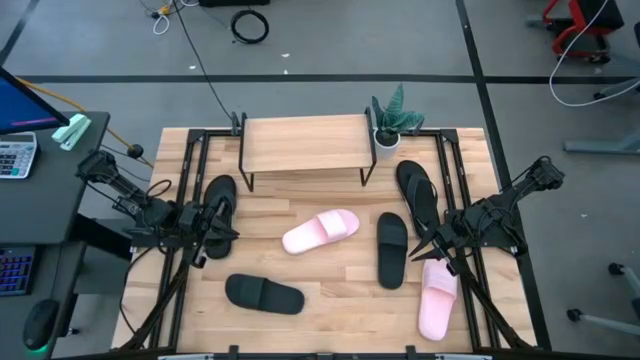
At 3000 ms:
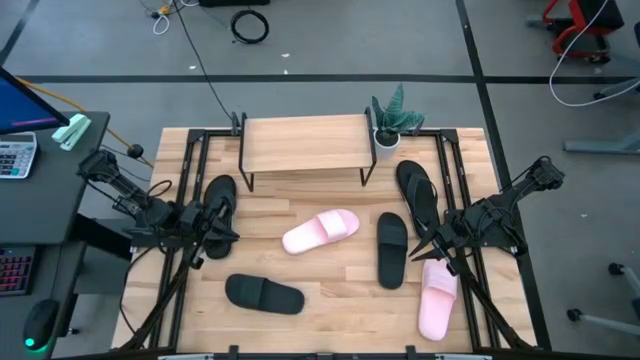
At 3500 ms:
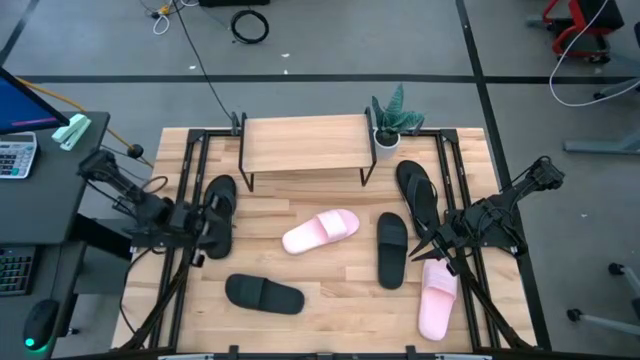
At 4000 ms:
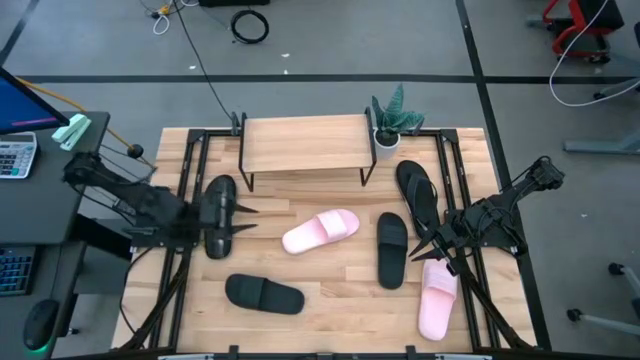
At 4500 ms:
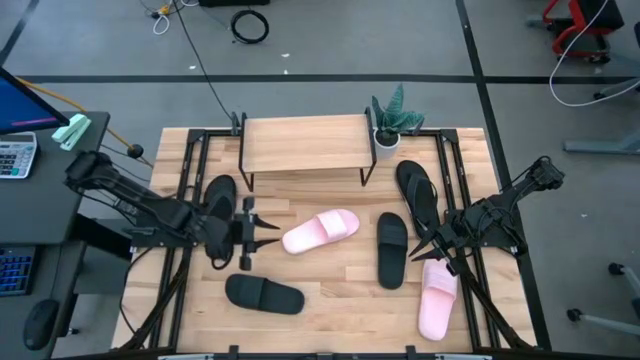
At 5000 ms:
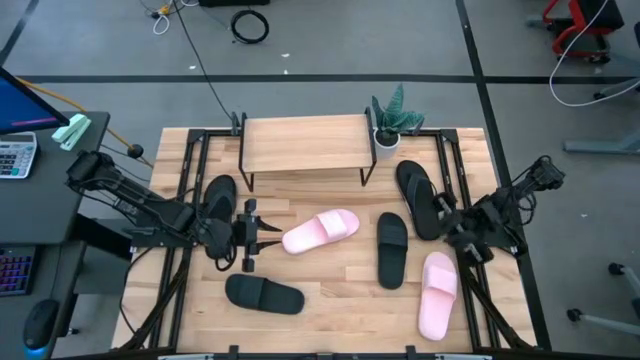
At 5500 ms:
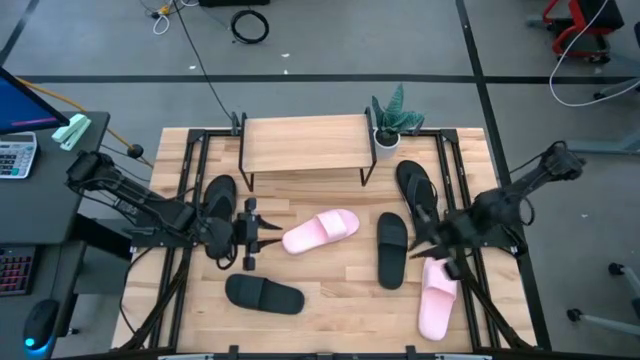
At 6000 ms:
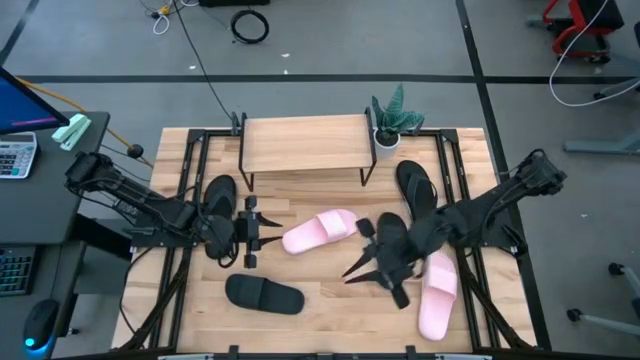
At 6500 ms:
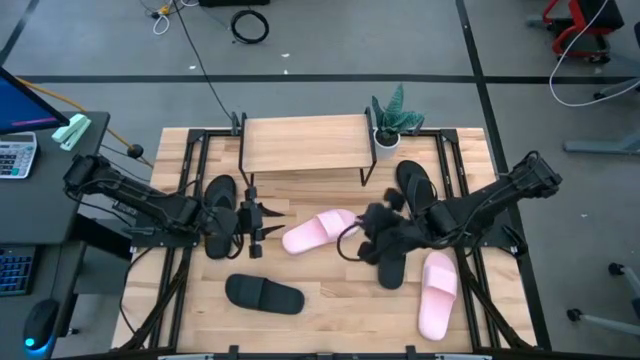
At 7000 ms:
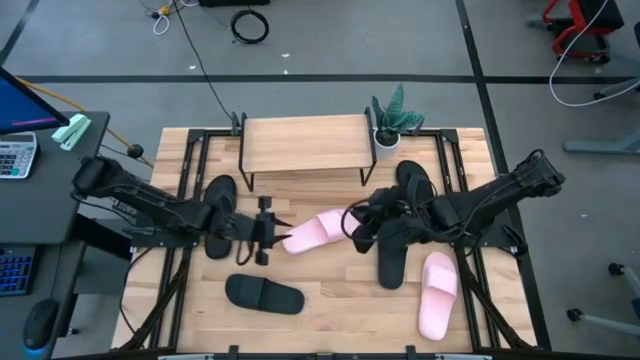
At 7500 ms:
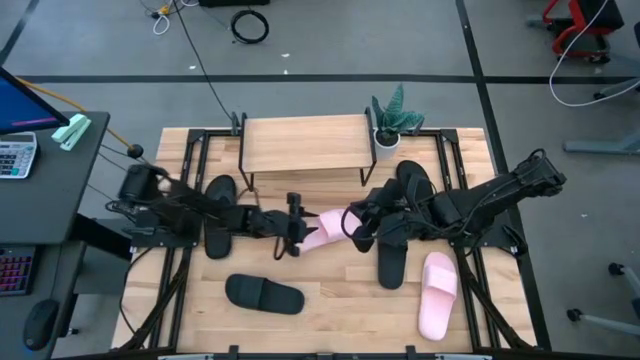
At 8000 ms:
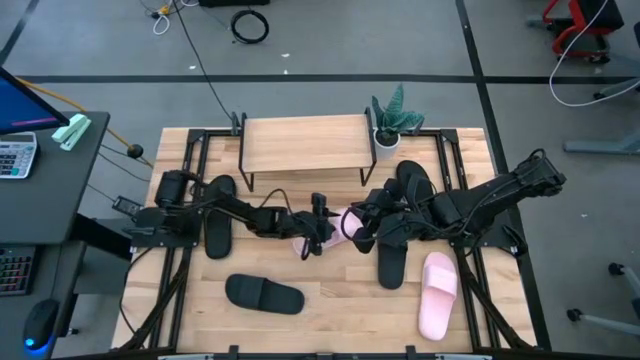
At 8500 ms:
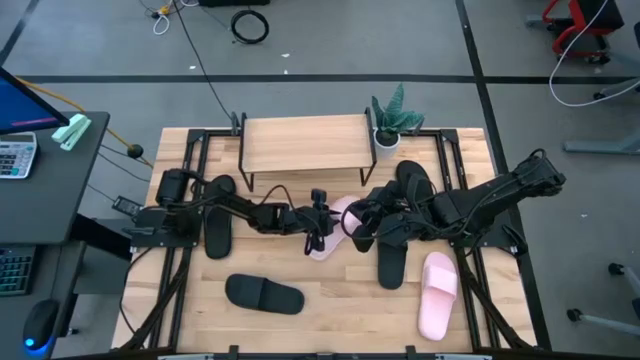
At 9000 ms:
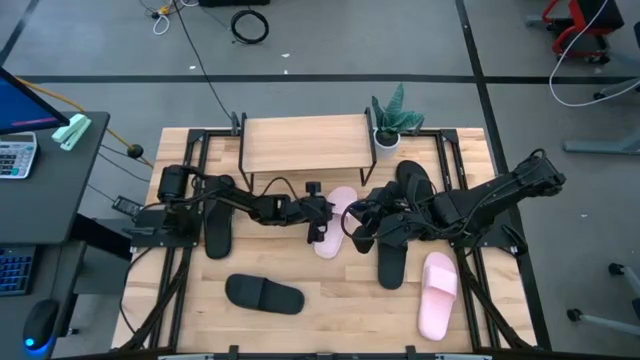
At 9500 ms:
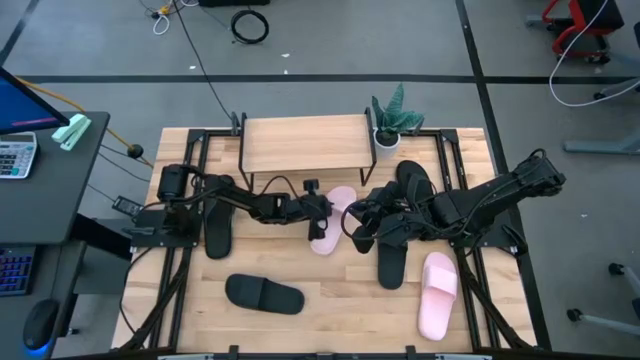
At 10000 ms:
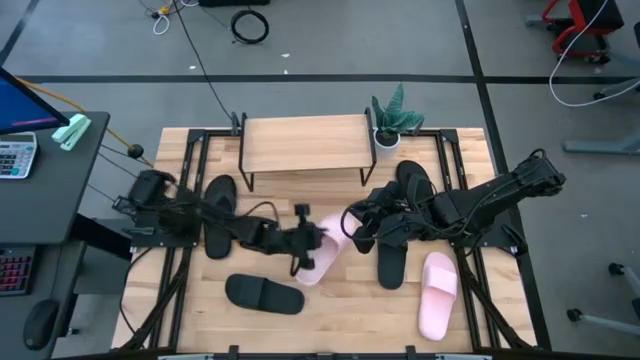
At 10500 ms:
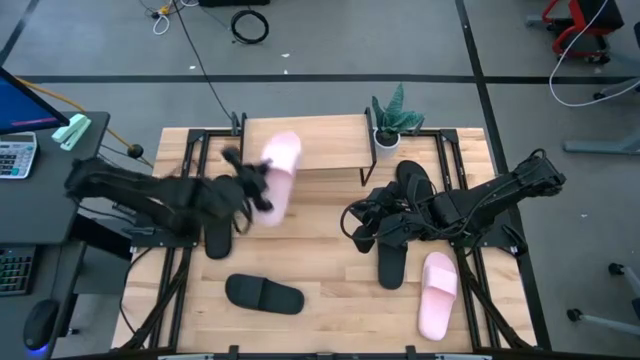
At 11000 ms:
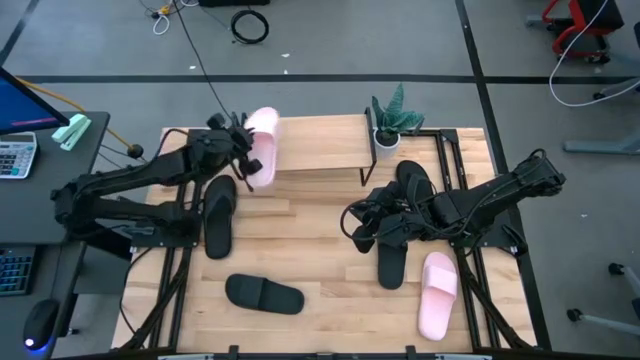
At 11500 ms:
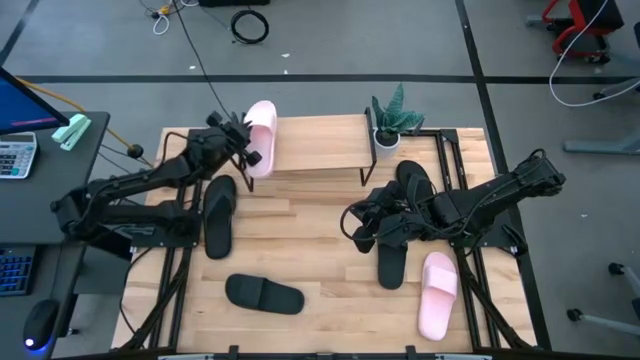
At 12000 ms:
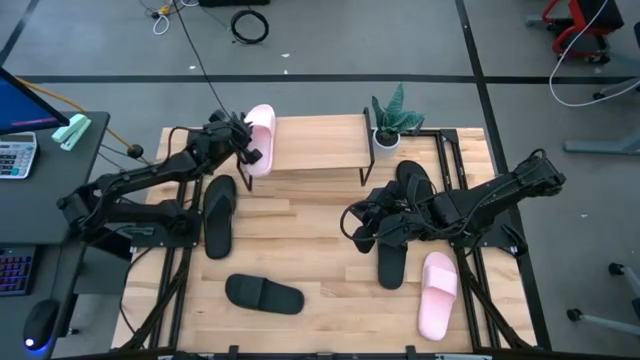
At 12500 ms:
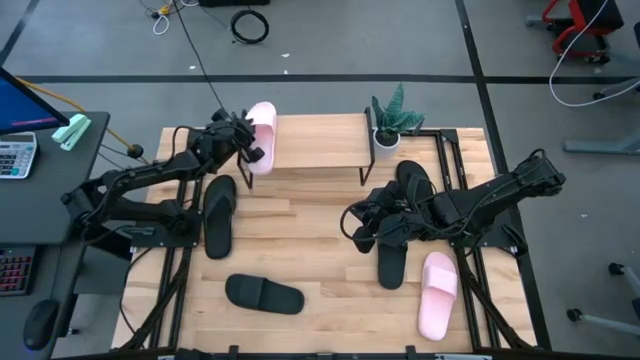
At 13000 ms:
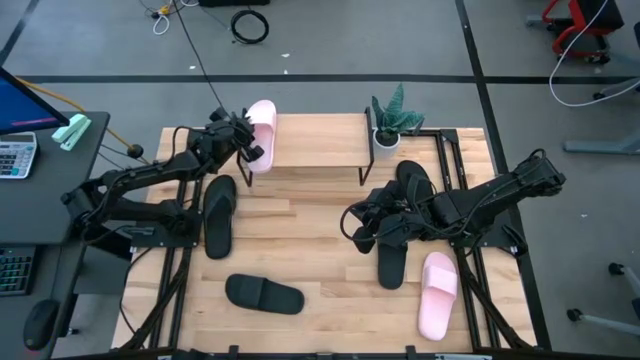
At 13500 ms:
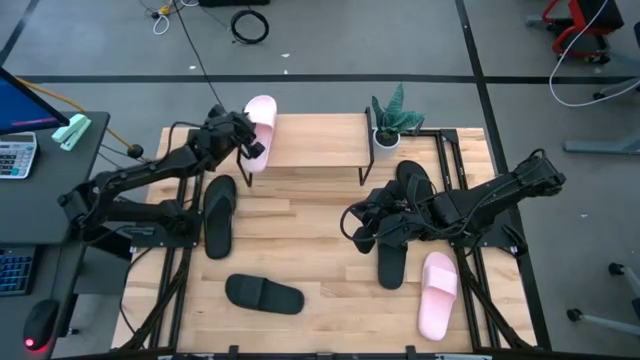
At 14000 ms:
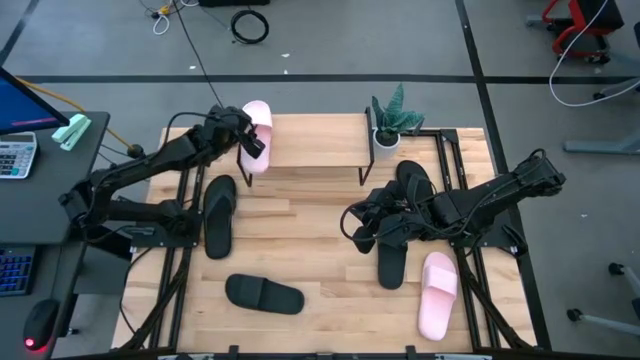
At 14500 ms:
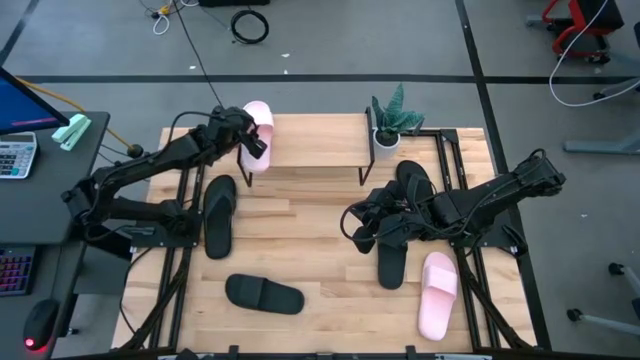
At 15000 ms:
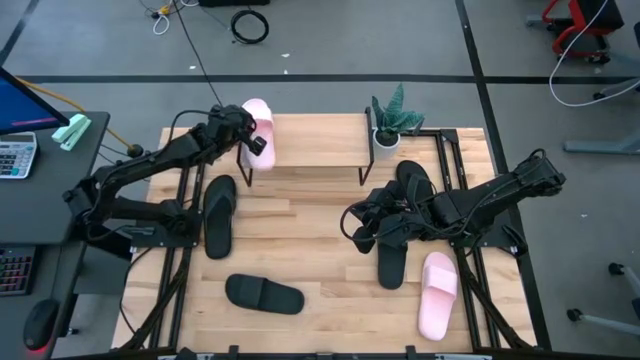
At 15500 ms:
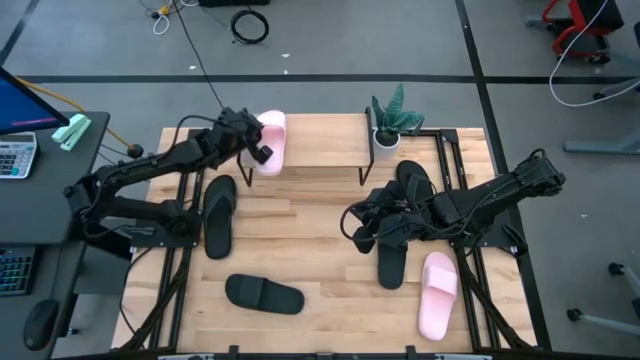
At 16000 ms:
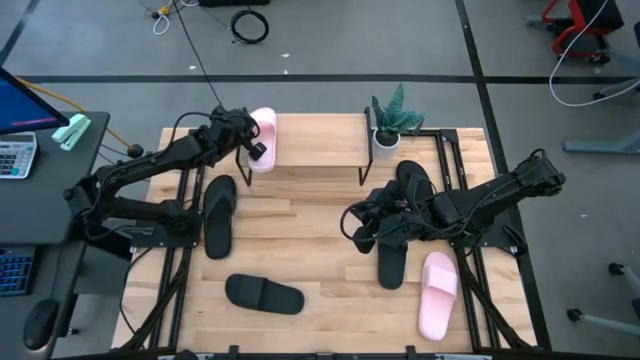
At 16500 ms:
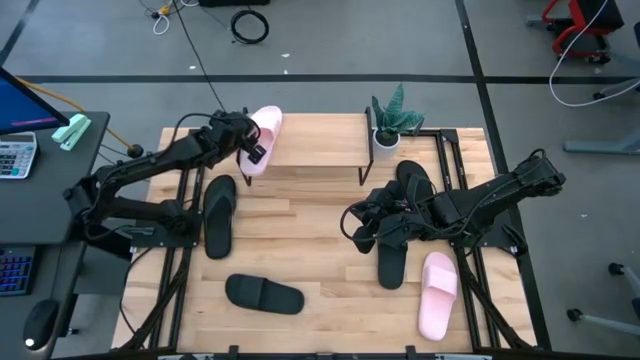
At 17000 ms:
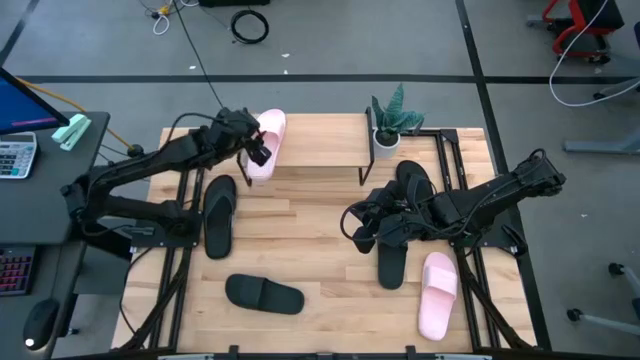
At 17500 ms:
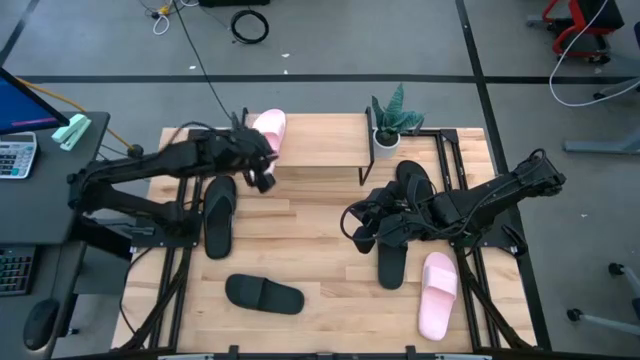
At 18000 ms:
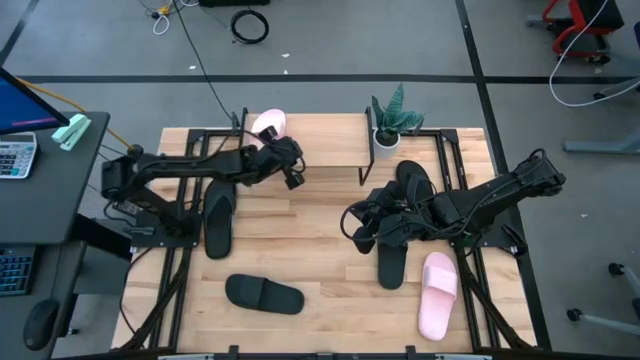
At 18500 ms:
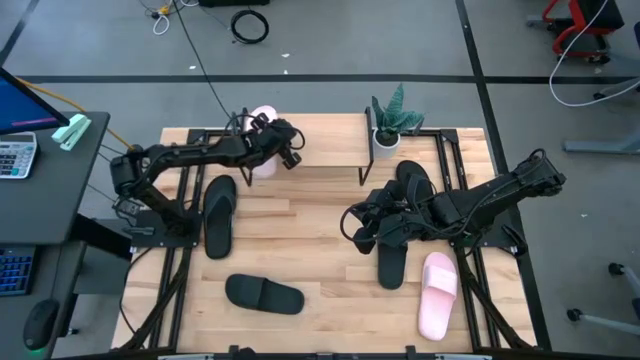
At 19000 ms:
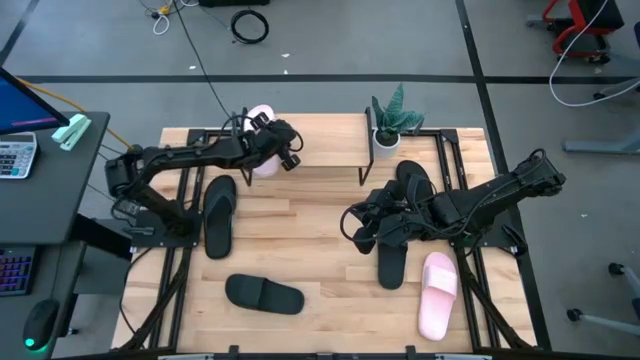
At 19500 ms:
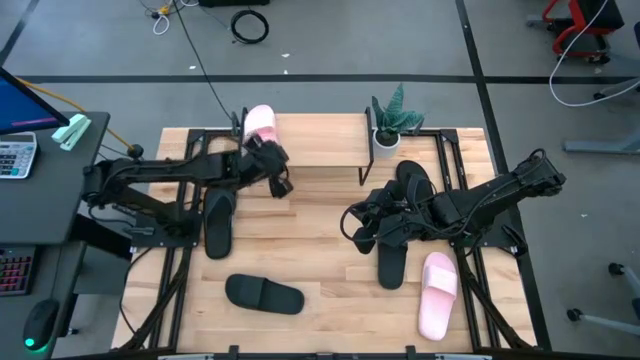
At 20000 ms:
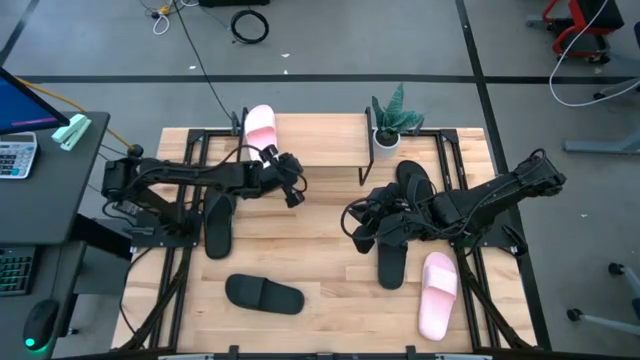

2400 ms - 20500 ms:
Task: Pick and place slides into the shelf
Put the left pink slipper on the shelf

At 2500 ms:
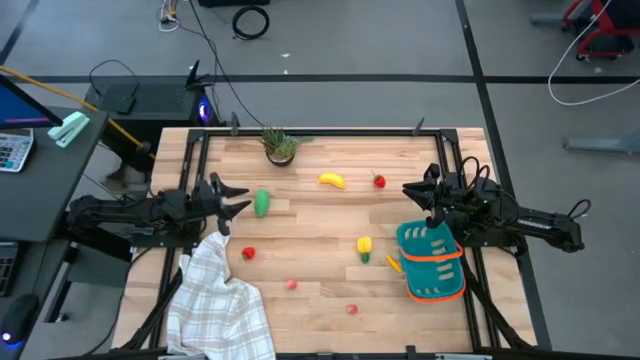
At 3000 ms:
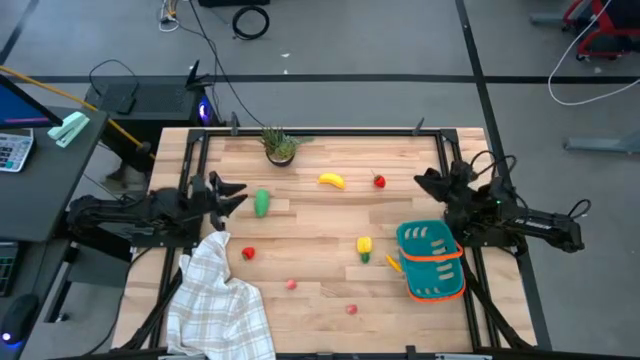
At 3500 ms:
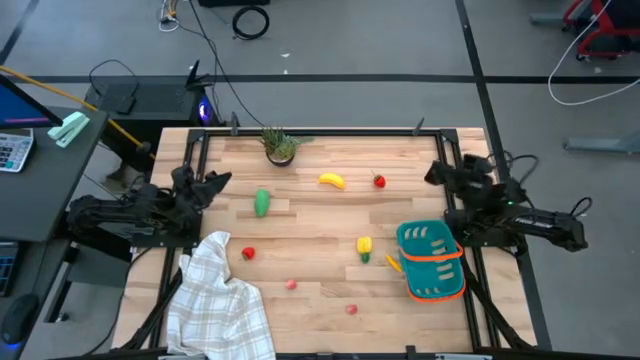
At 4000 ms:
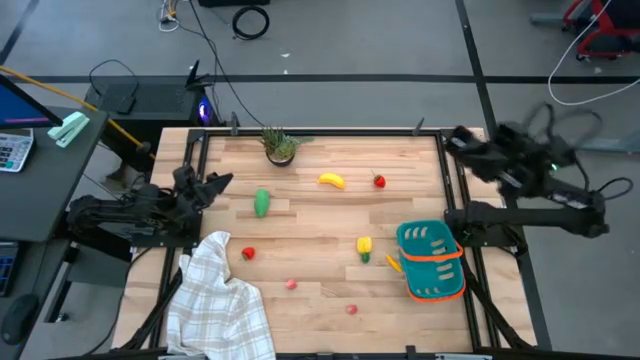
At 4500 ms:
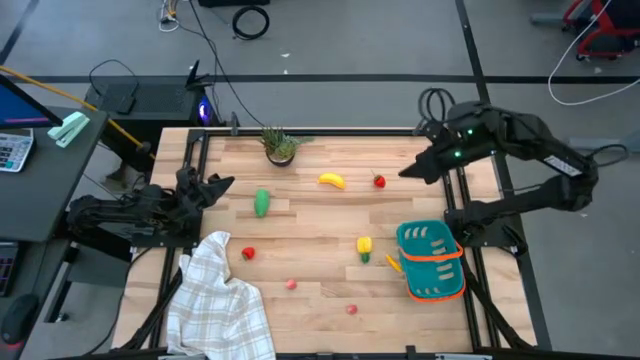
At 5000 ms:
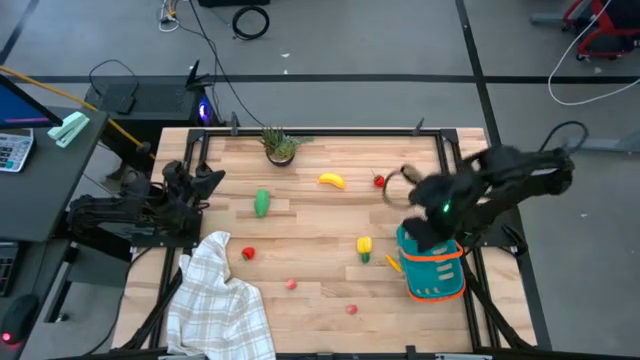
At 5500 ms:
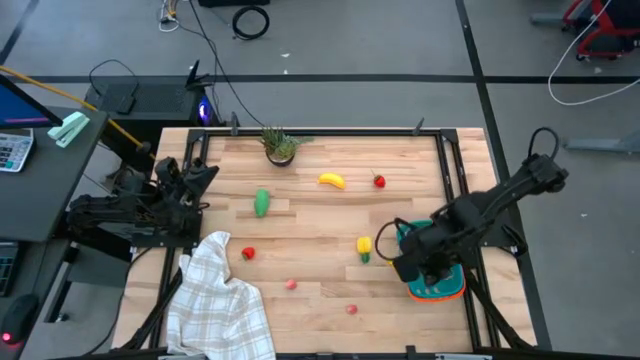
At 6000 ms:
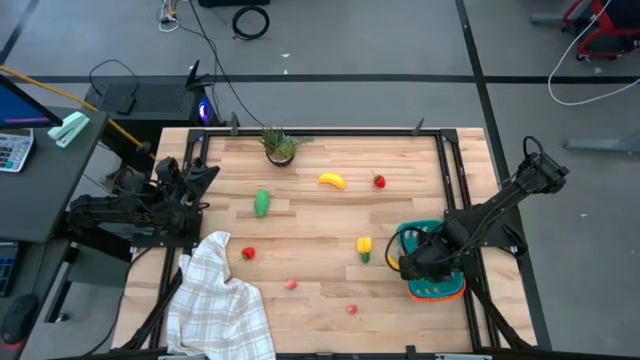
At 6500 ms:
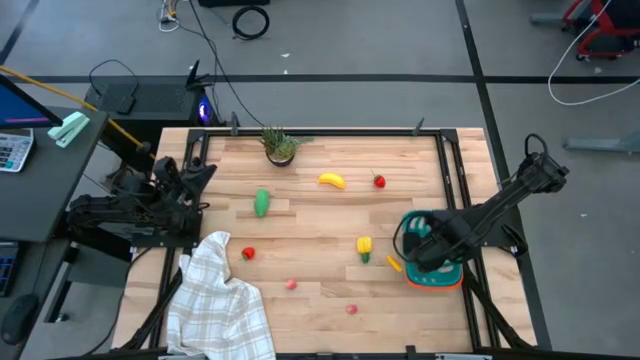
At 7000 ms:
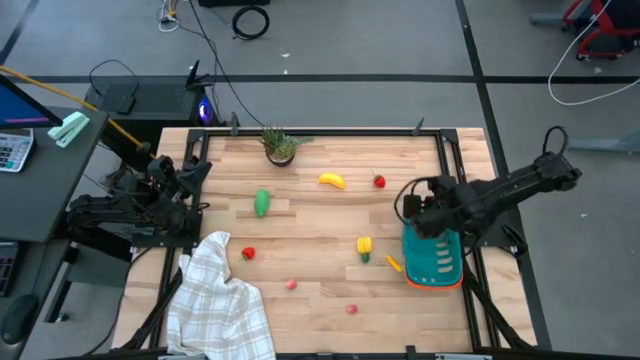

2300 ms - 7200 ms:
Task: Pick and placing Produce into tupperware
Prepare the blue basket
